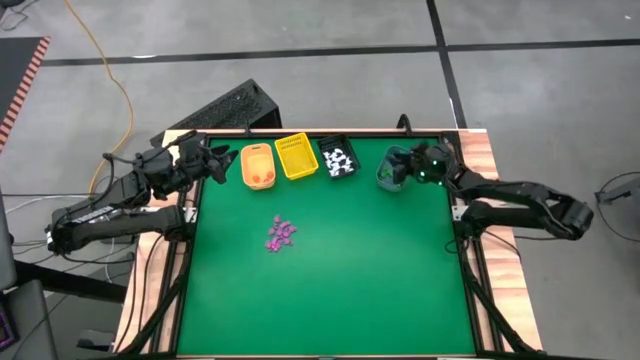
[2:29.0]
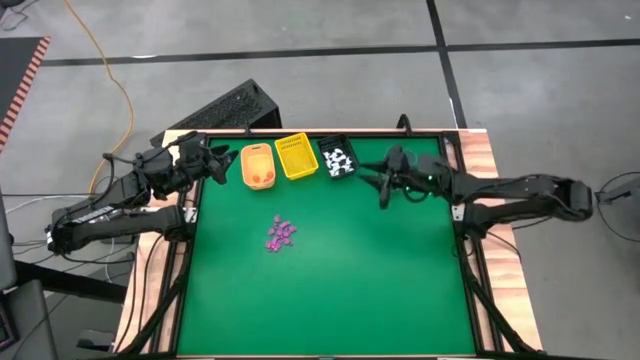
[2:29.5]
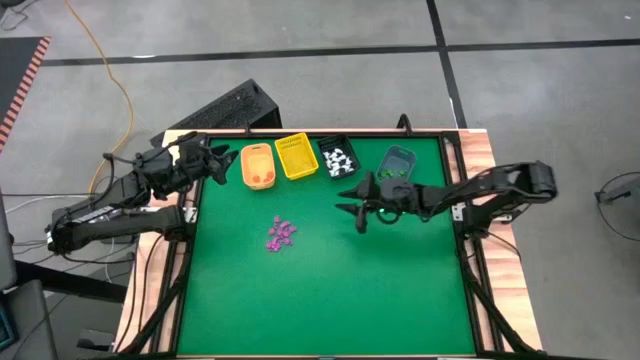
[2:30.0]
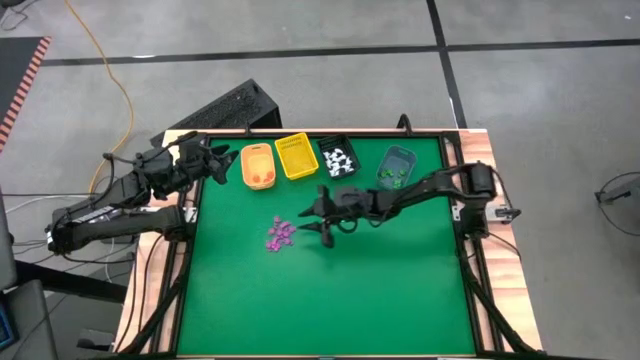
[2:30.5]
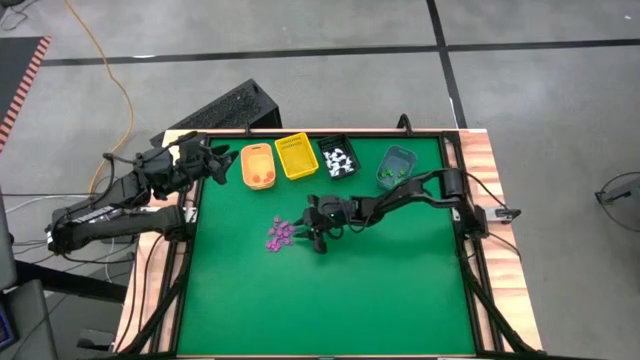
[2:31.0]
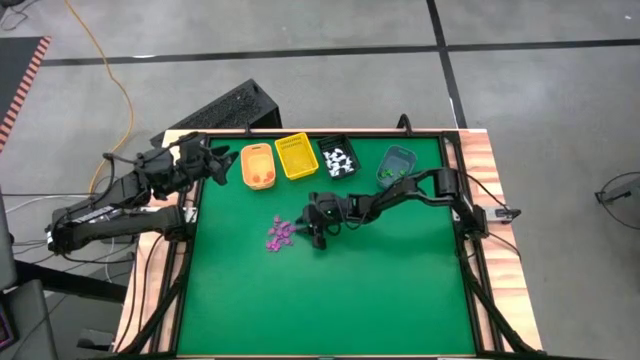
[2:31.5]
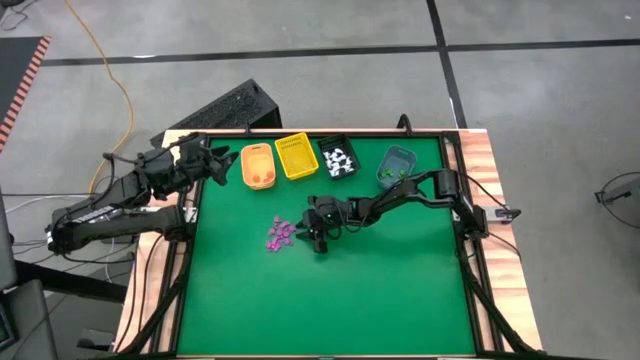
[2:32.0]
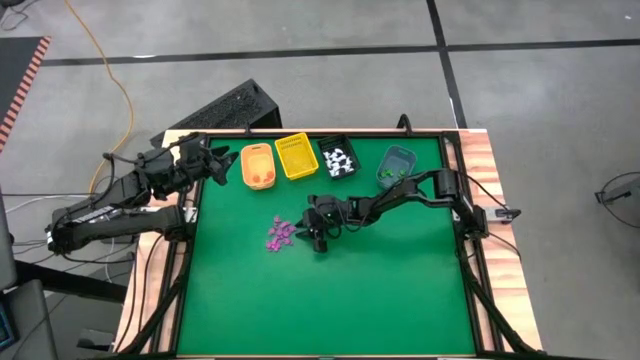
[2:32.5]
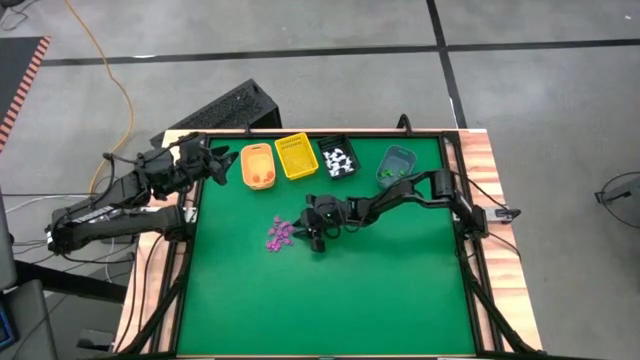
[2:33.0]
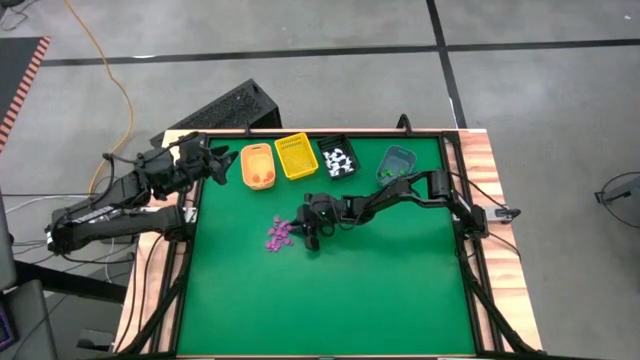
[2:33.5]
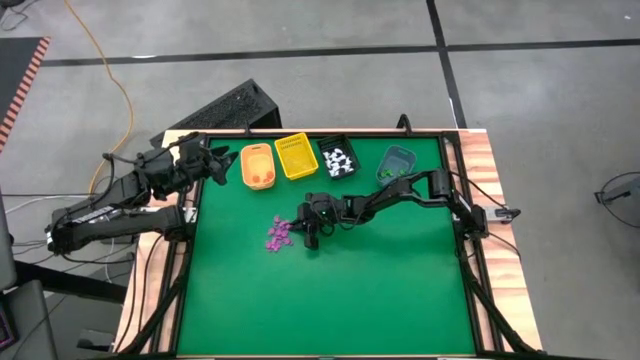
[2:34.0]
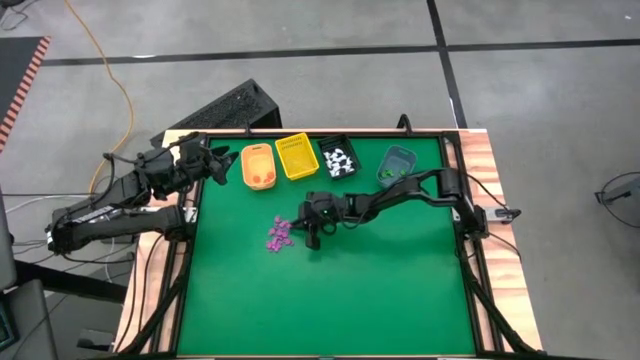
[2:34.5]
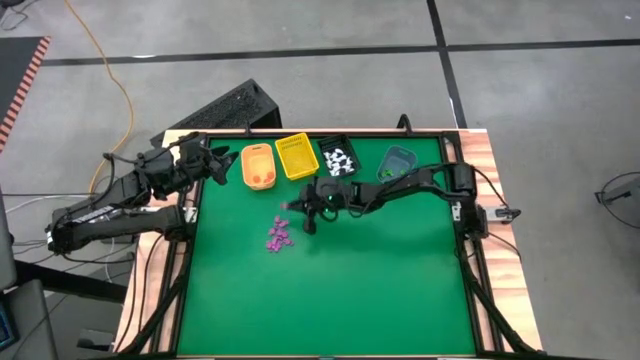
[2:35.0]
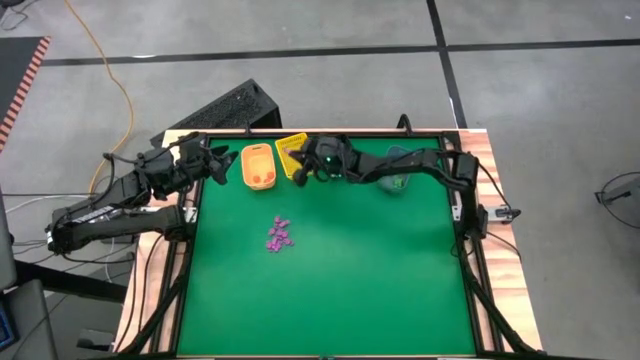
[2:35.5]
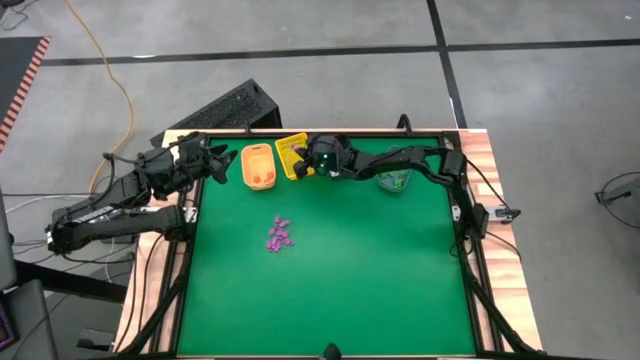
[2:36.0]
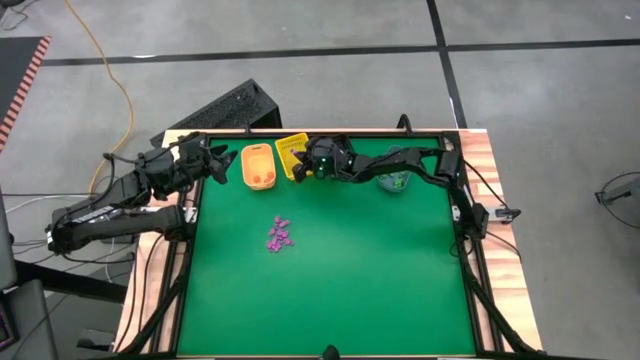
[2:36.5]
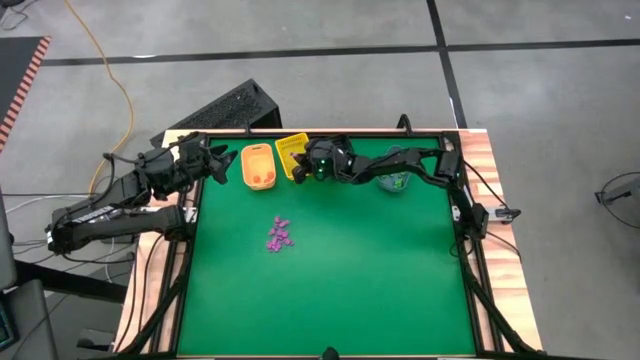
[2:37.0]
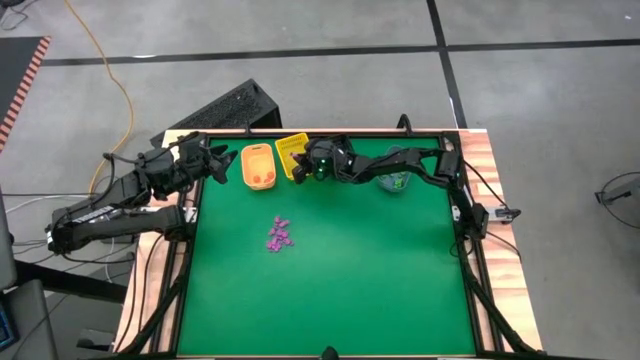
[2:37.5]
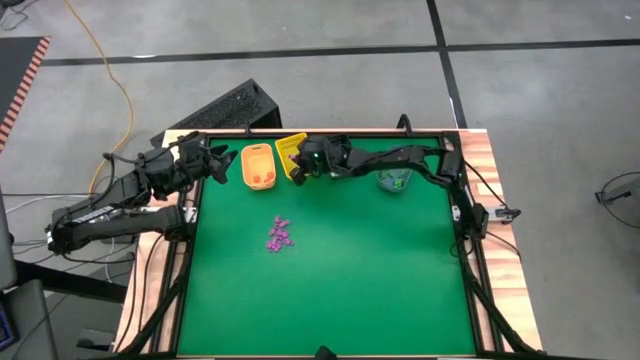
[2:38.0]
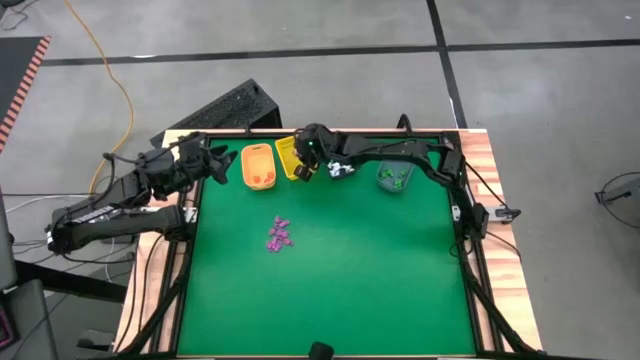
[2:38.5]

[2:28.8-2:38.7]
Task: Sort Halloween decoration
Put the pink skeleton toy into the yellow bin

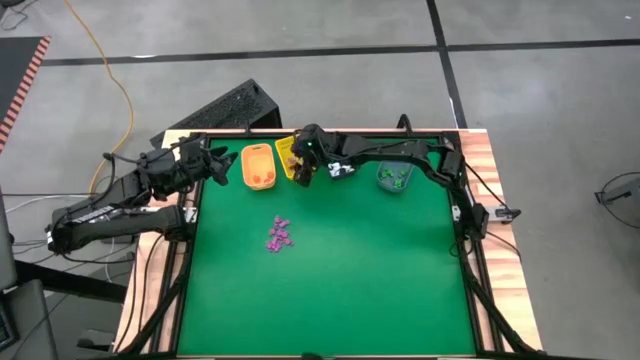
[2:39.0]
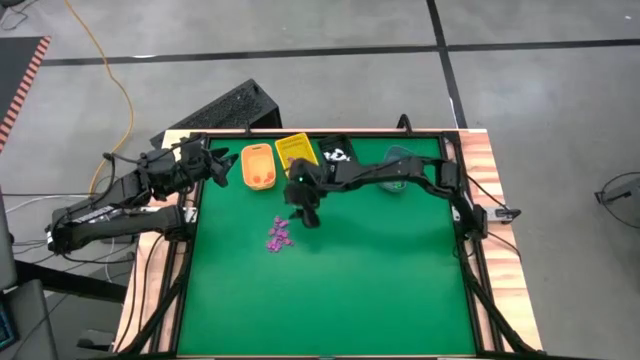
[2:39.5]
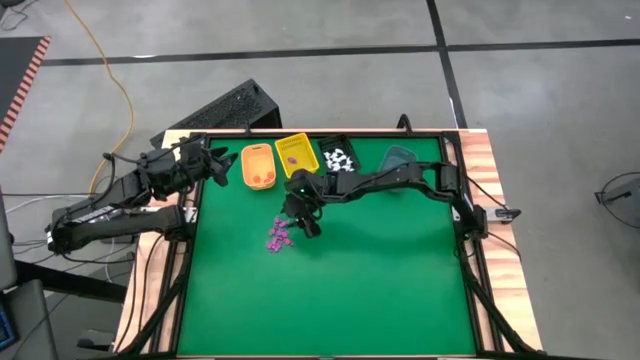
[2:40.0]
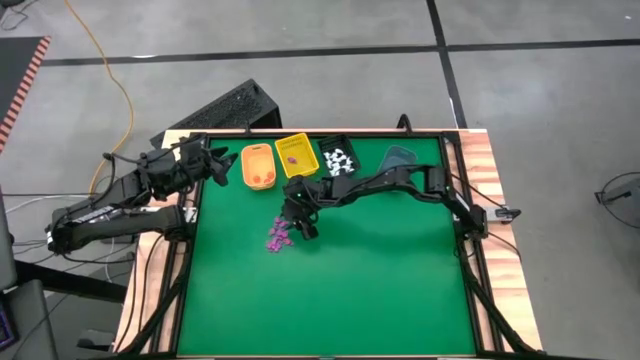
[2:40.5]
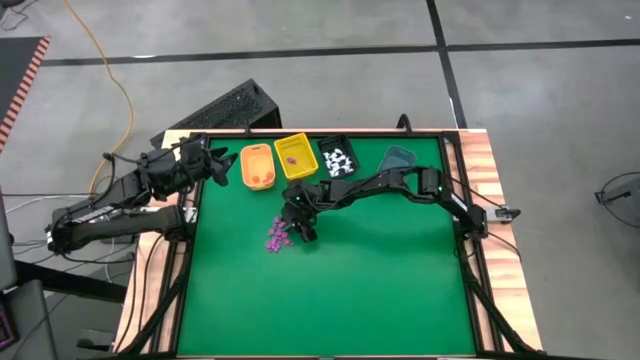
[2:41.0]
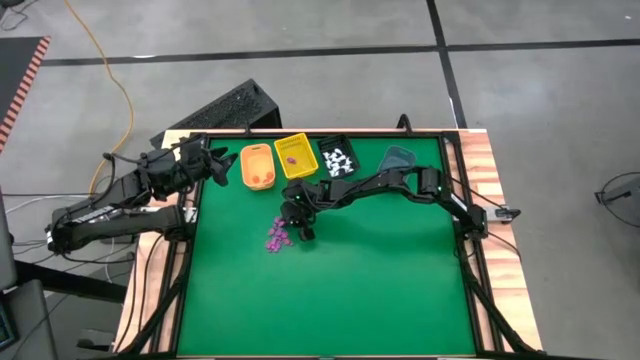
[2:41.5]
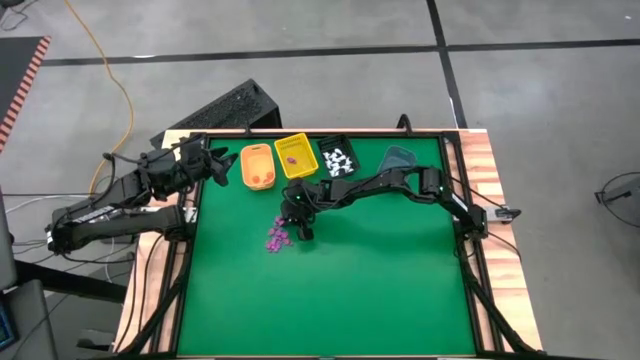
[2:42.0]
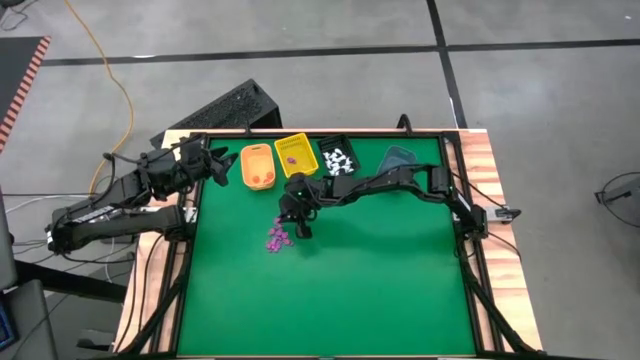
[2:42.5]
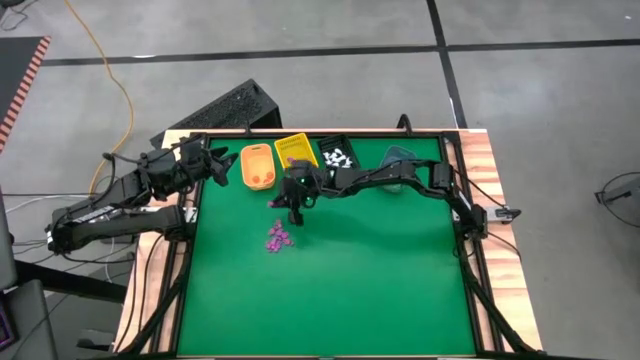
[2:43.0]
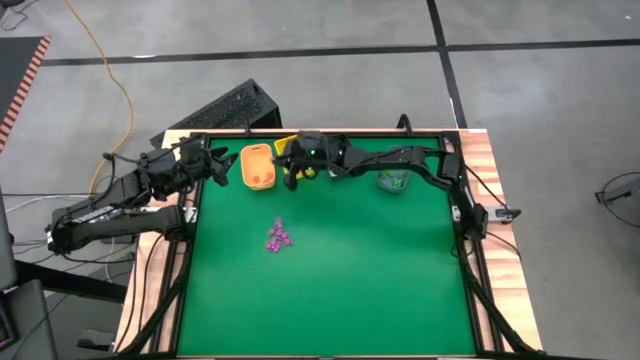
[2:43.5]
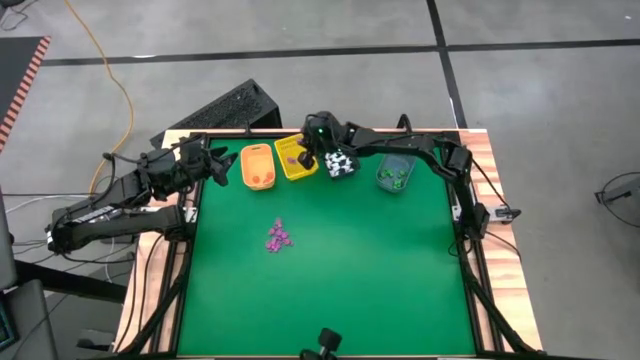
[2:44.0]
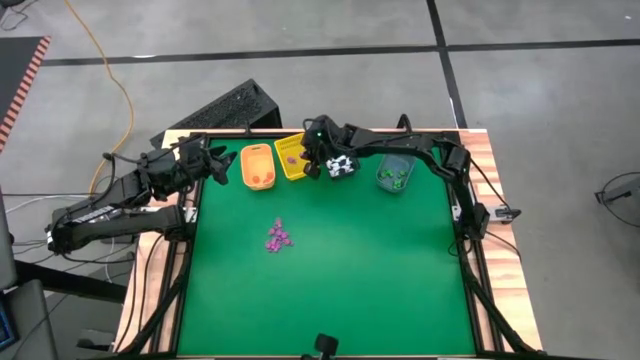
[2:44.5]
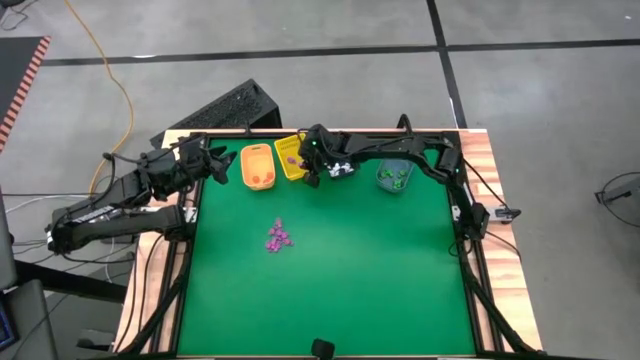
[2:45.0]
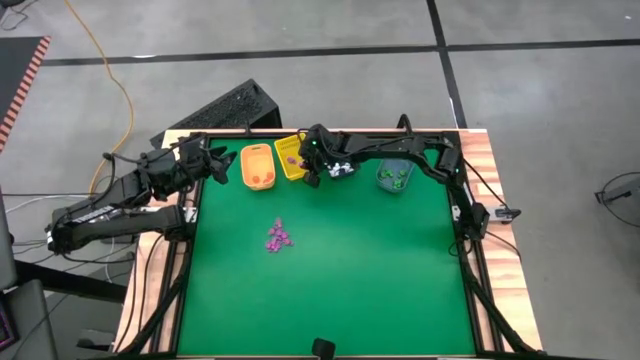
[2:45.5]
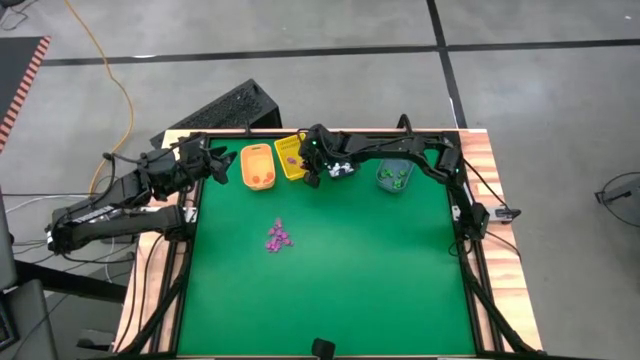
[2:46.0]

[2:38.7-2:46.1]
Put the pink skeleton toy into the yellow bin

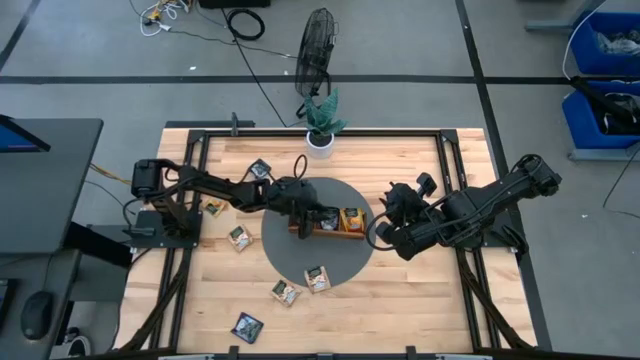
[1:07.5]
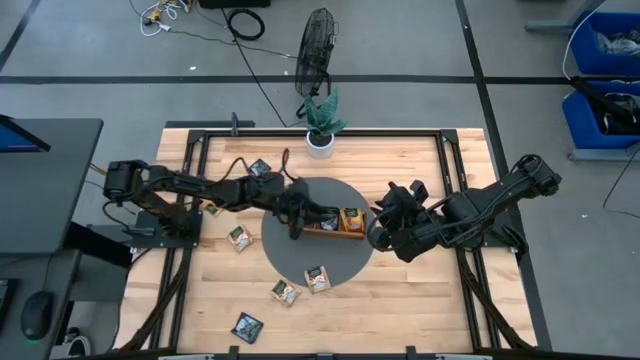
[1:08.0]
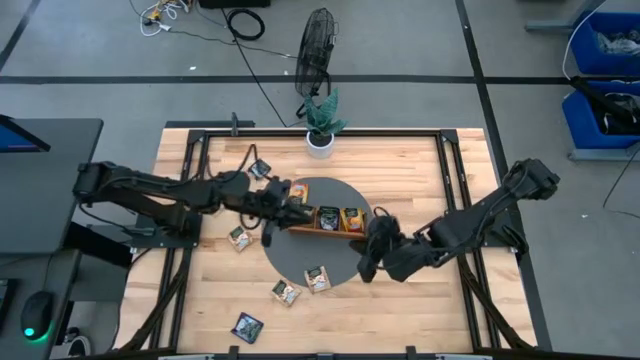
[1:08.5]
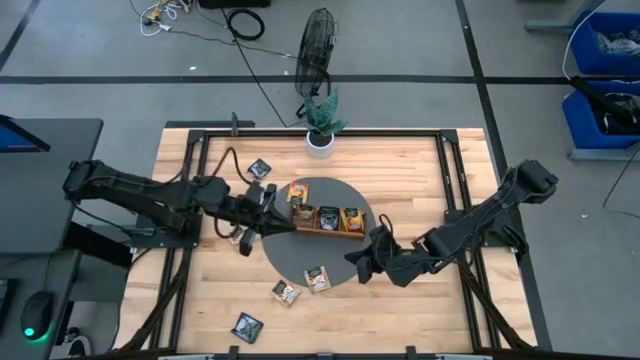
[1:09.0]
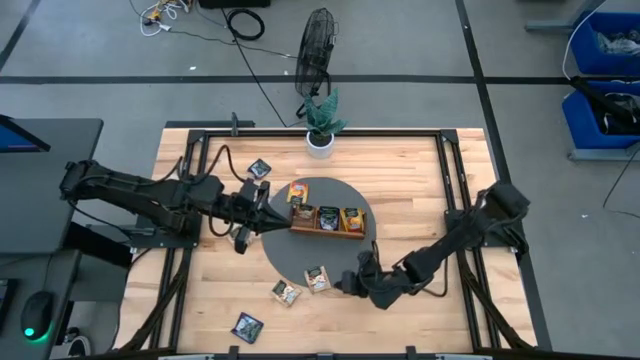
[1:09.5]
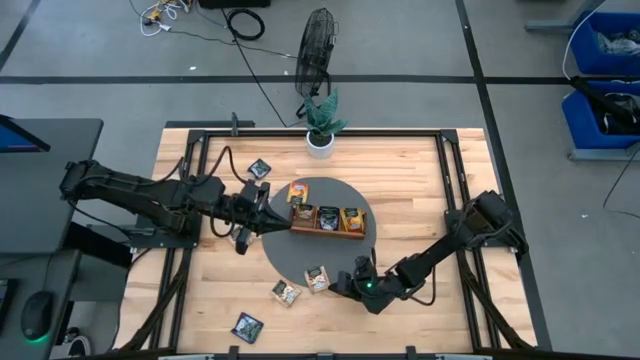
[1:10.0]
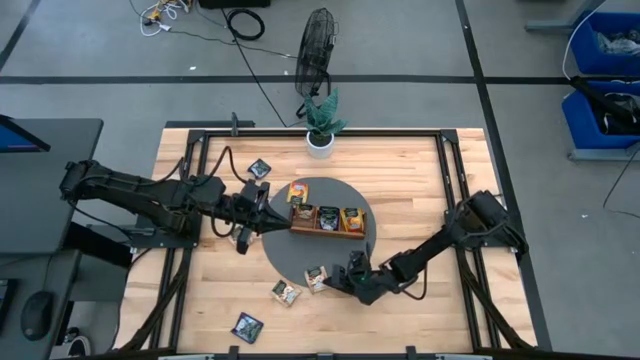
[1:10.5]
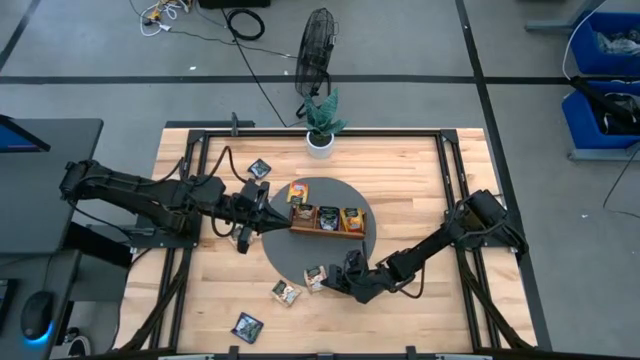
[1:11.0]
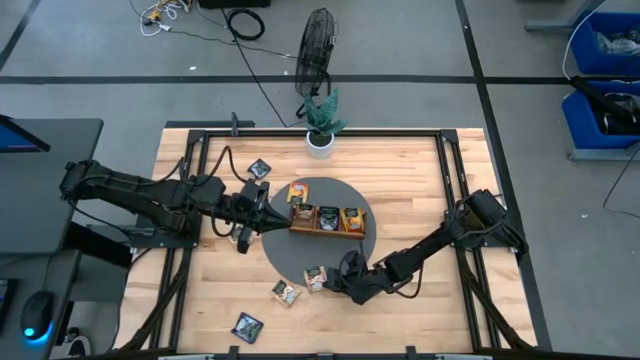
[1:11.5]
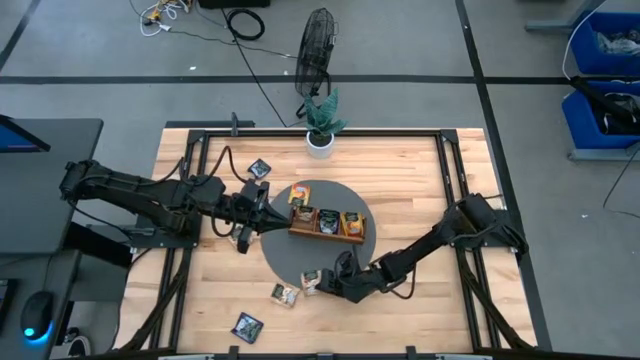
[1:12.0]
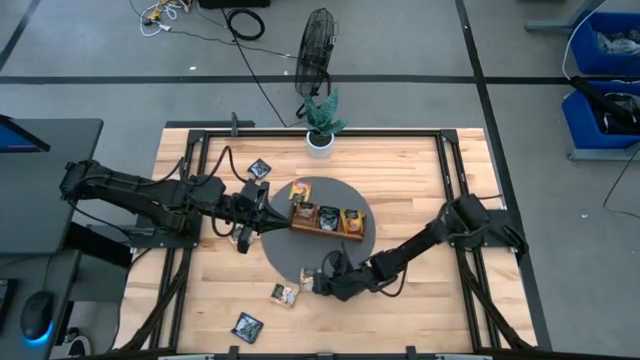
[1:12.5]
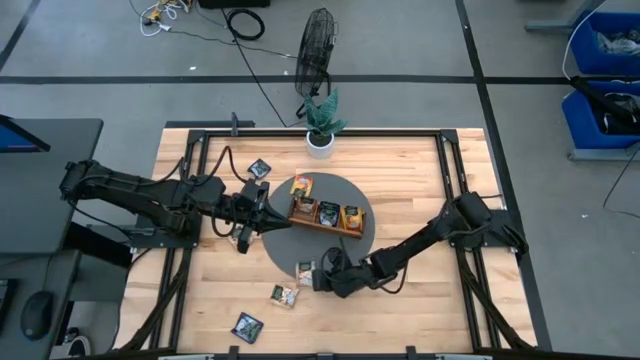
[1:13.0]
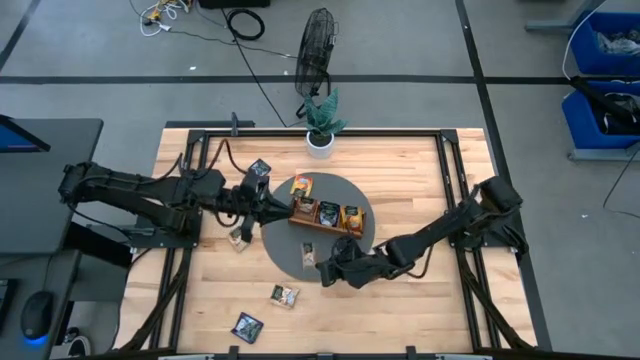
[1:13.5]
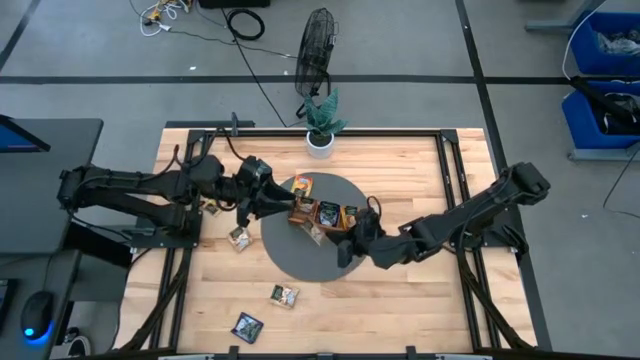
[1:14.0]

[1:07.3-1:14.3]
Task: Pick & Place Tea
Put the brown tea bag into the left section of the wooden organizer
